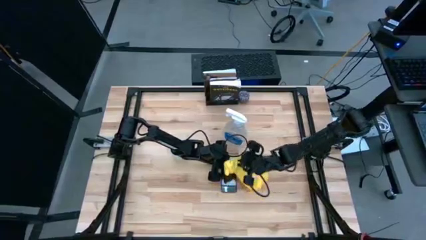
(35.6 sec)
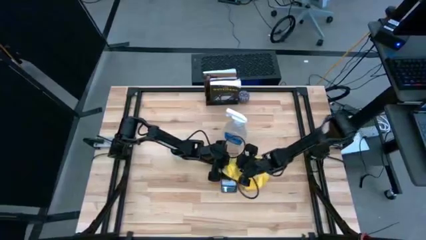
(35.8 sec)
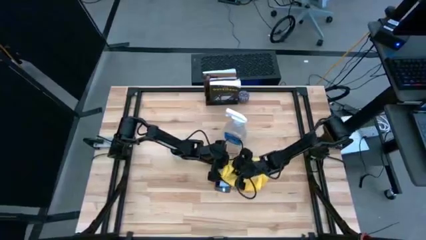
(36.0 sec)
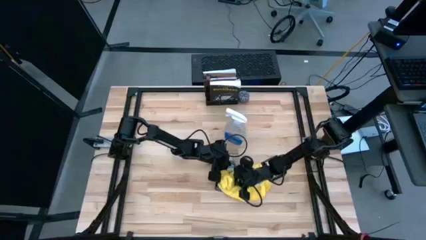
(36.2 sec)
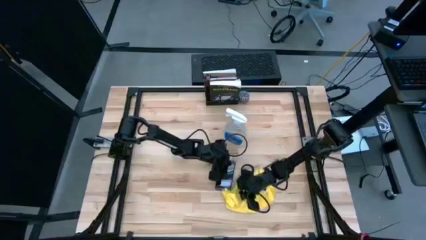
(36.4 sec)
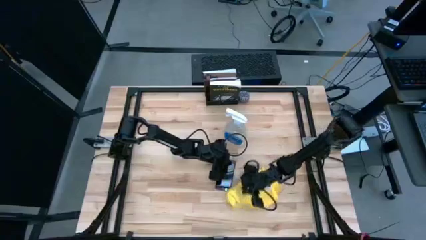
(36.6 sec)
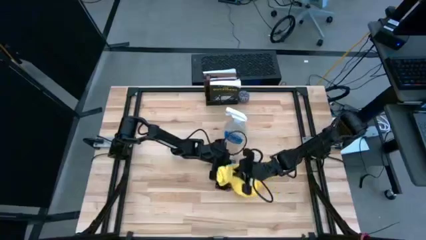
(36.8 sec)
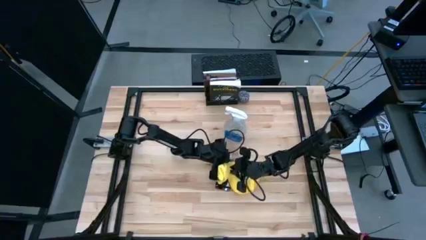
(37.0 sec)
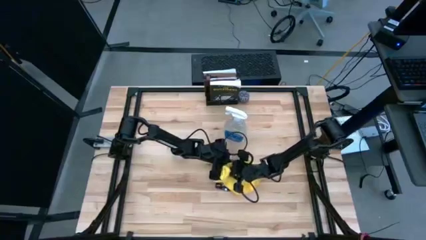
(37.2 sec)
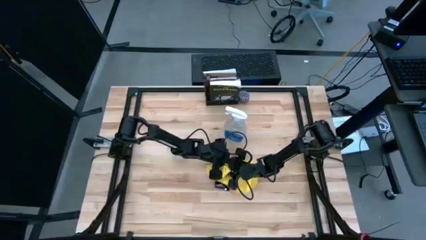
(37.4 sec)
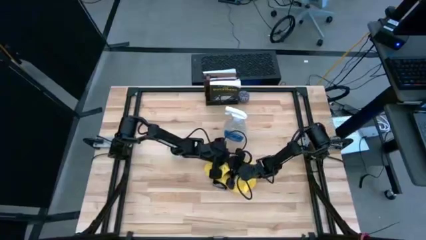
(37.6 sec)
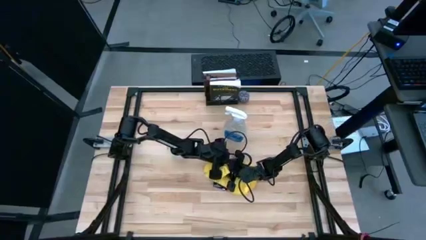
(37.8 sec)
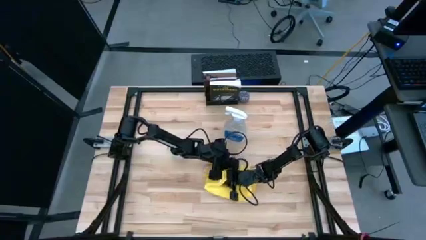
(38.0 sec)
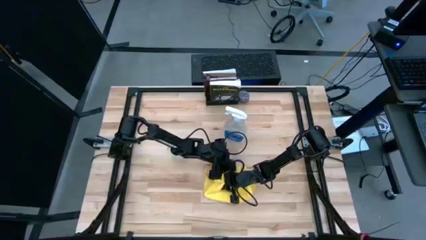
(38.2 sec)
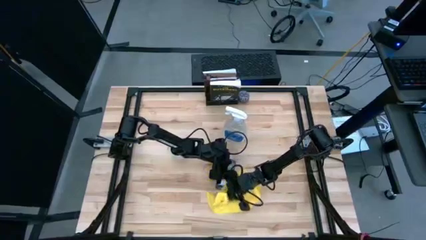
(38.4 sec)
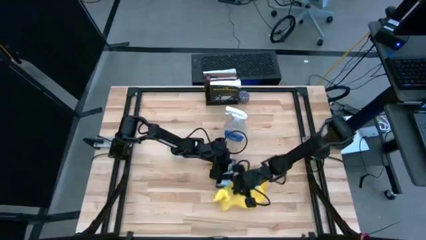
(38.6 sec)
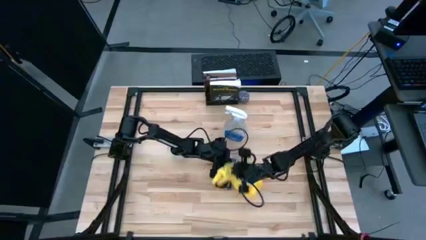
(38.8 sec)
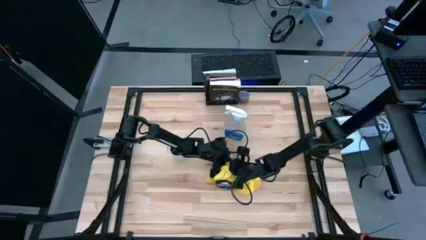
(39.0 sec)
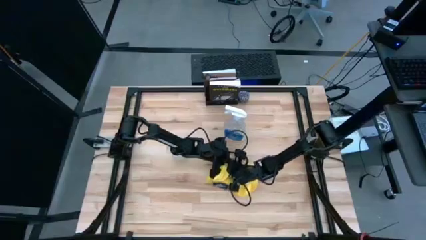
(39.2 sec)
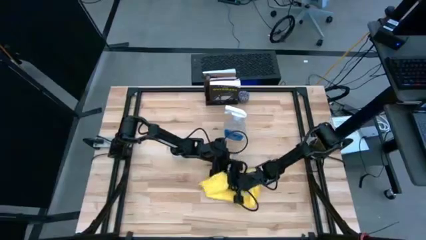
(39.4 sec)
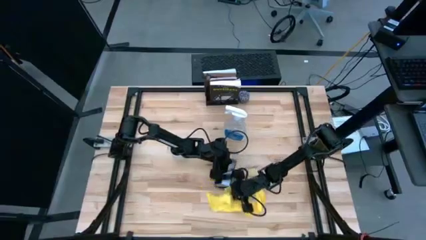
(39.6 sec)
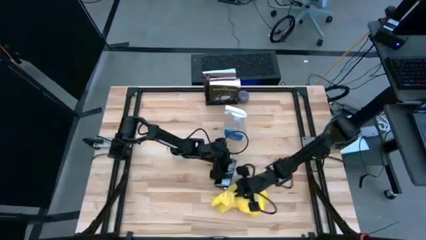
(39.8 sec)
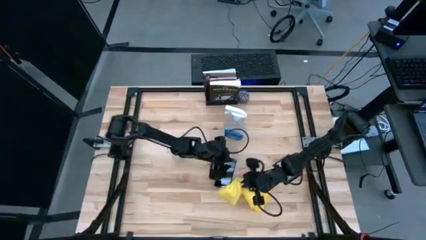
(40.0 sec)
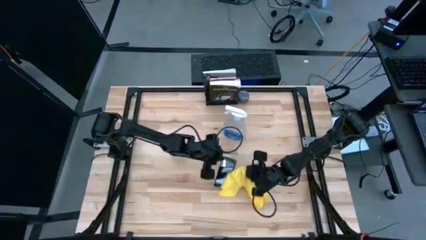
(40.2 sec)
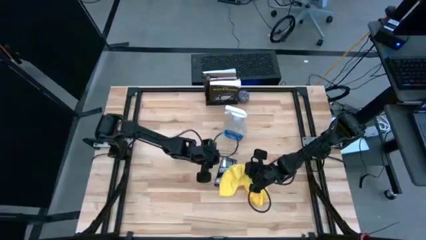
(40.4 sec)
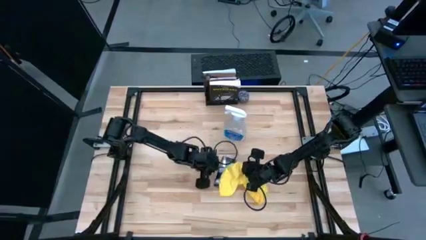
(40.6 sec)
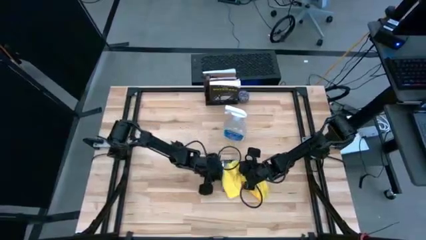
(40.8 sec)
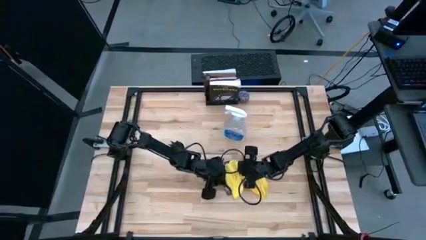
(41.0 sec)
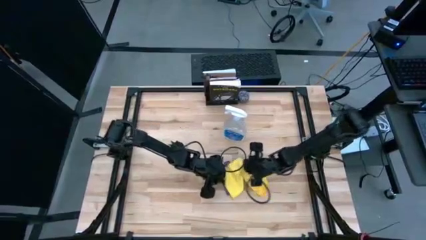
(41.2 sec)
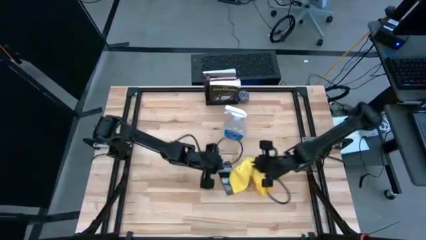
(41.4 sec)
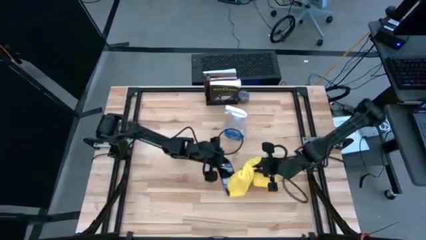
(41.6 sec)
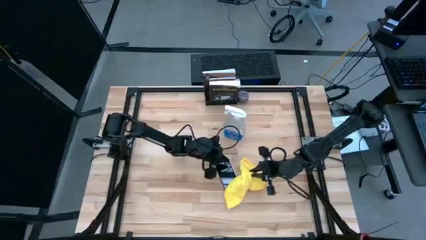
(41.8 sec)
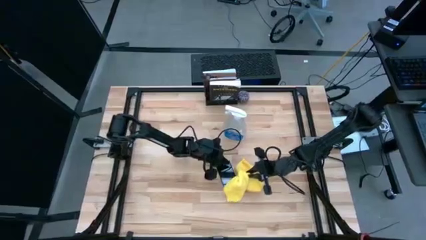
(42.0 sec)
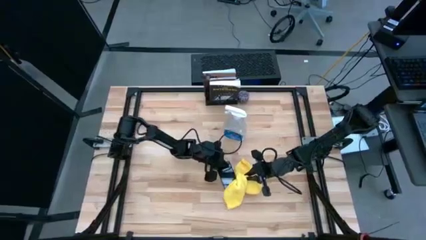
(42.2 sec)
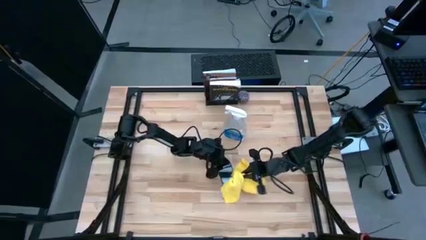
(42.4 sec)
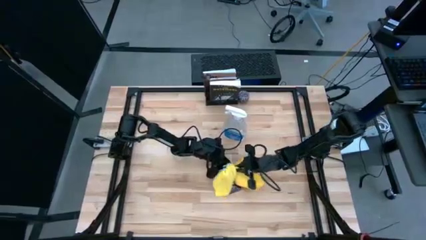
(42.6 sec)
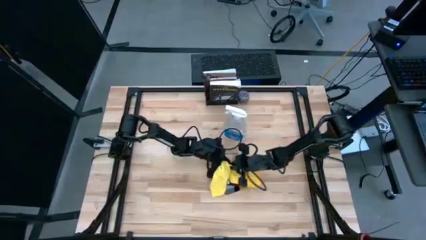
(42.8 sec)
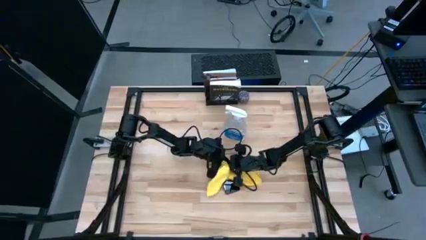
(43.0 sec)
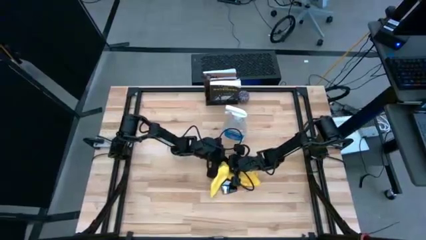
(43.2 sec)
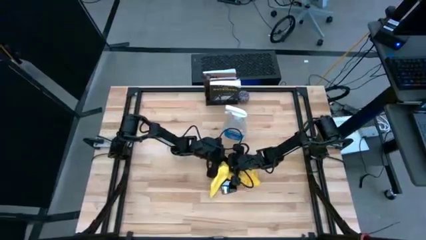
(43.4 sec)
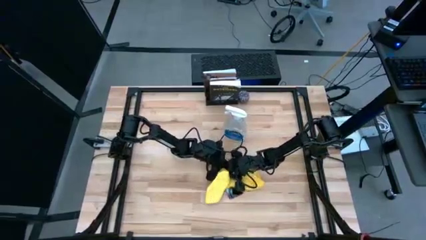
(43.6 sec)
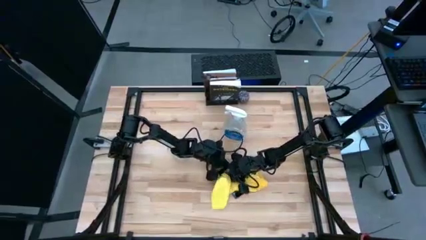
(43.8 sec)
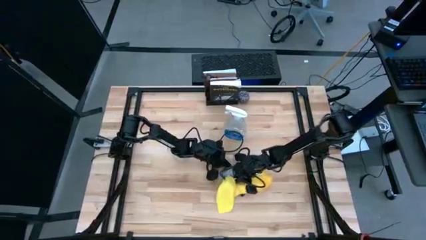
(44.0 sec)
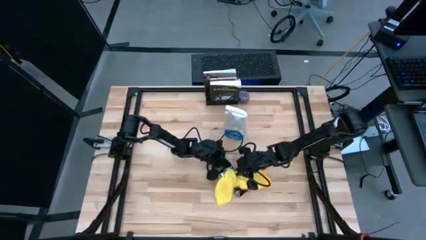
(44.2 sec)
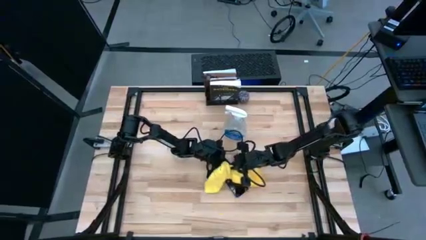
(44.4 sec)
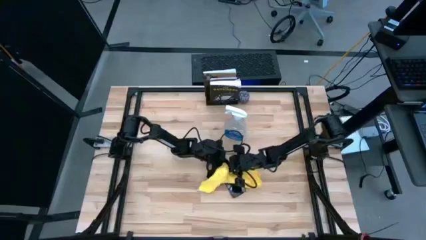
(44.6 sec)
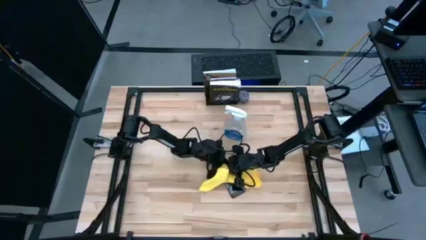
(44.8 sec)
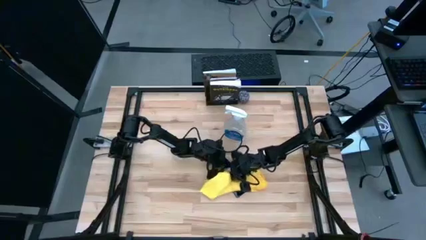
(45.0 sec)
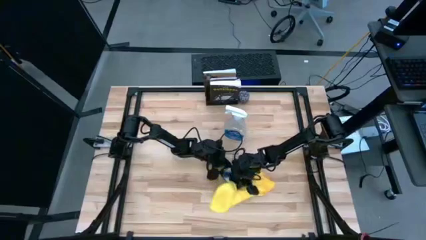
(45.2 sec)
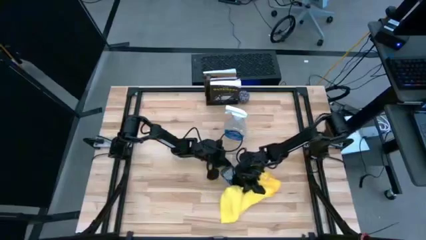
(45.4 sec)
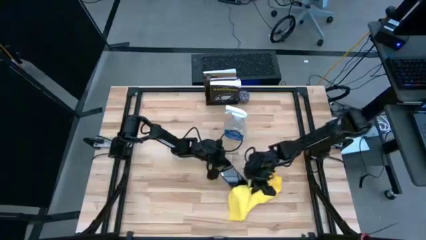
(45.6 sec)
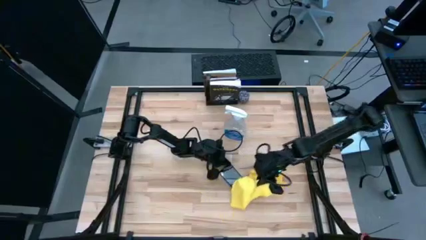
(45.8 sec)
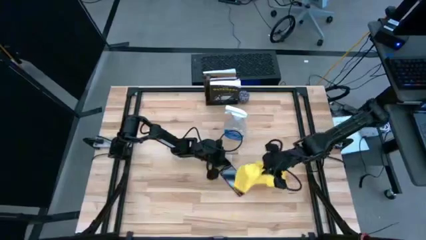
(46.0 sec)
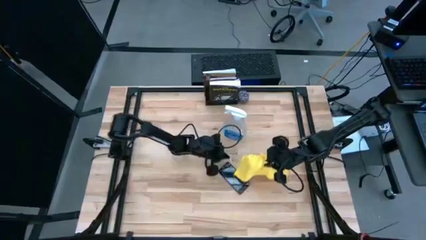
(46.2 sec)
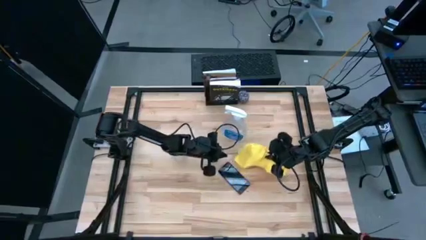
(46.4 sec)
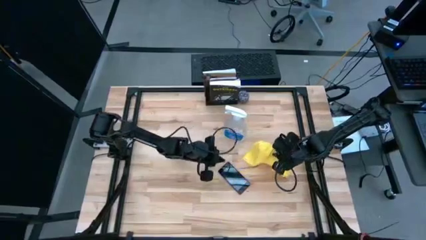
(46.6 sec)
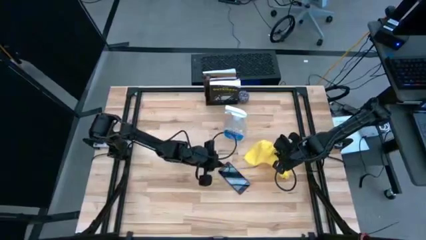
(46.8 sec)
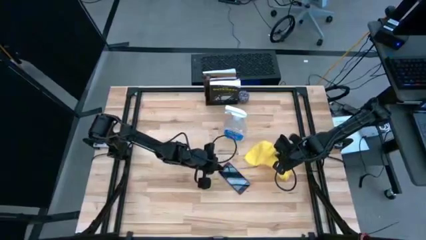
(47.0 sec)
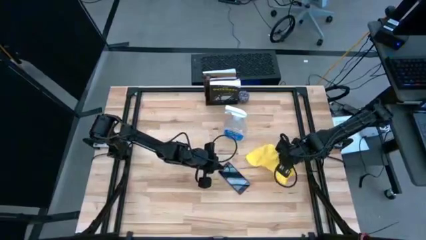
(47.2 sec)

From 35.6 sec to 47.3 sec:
Task: Apply microfiber cloth
Wipe the front of the cellphone with a microfiber cloth

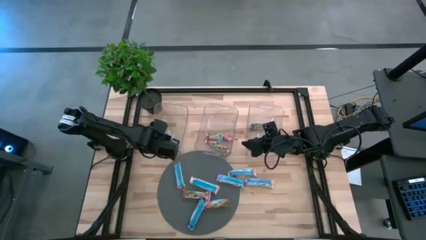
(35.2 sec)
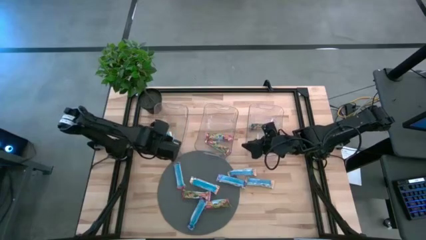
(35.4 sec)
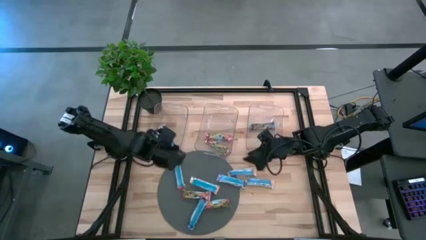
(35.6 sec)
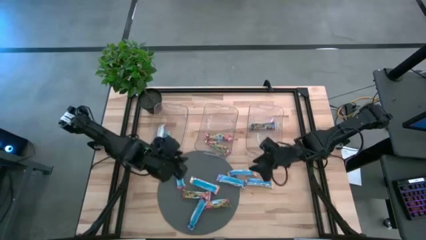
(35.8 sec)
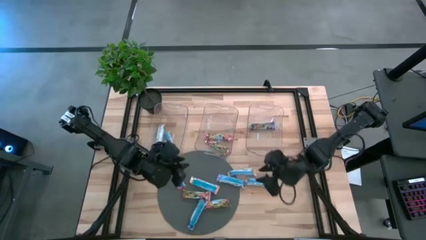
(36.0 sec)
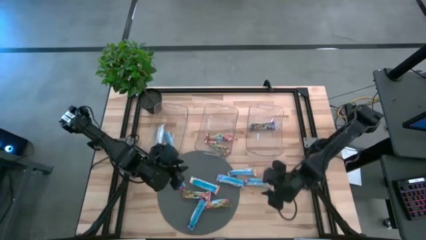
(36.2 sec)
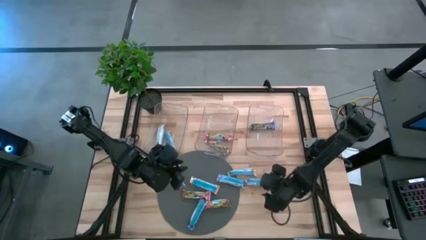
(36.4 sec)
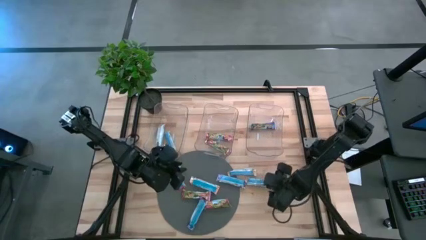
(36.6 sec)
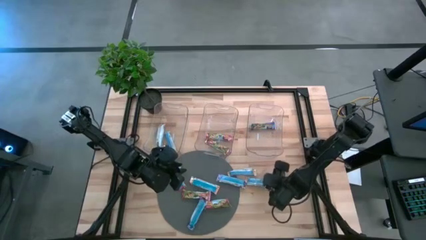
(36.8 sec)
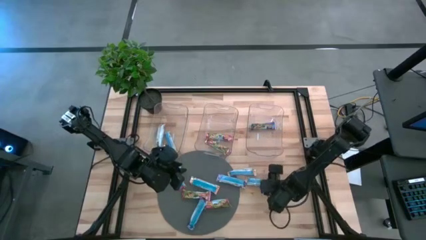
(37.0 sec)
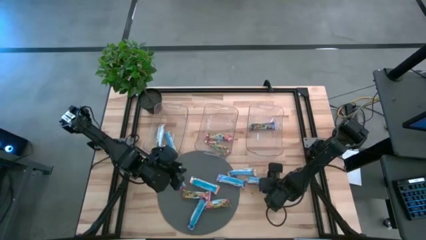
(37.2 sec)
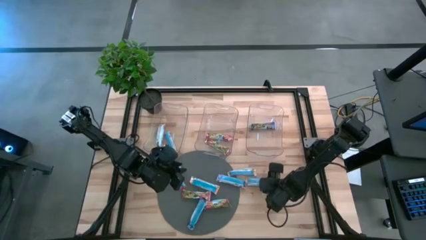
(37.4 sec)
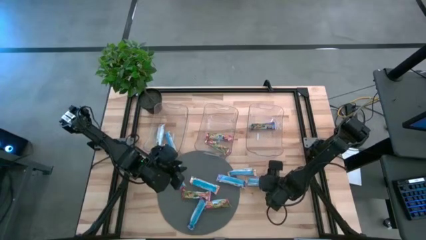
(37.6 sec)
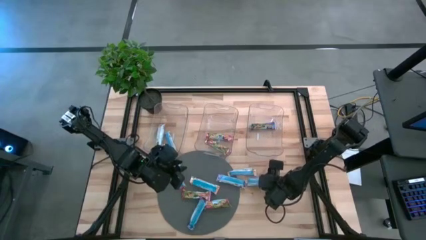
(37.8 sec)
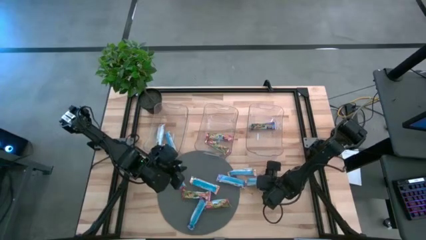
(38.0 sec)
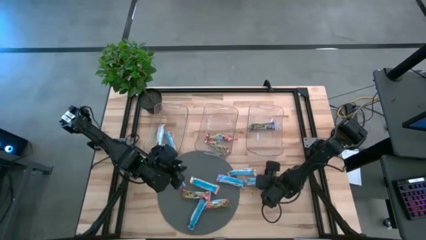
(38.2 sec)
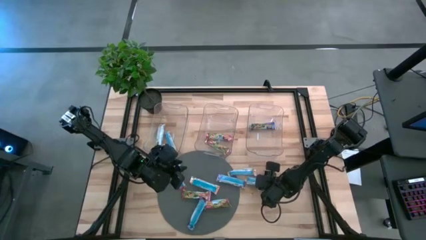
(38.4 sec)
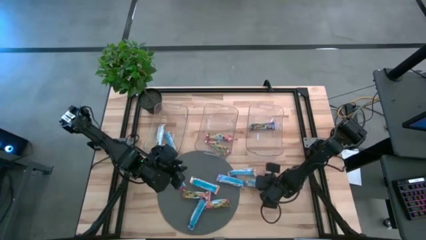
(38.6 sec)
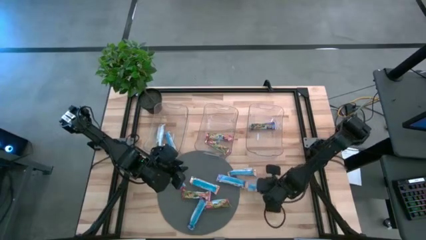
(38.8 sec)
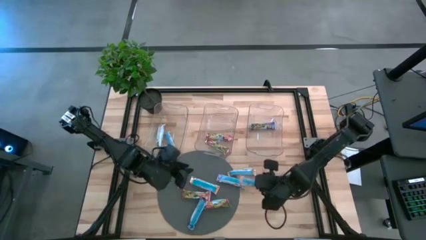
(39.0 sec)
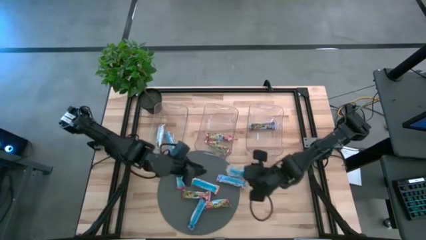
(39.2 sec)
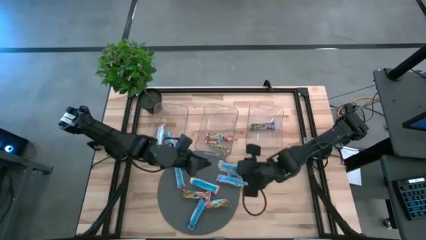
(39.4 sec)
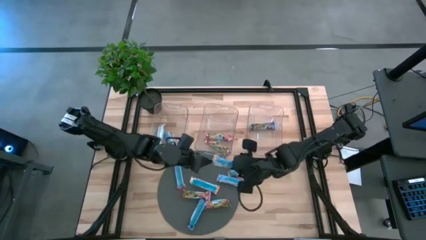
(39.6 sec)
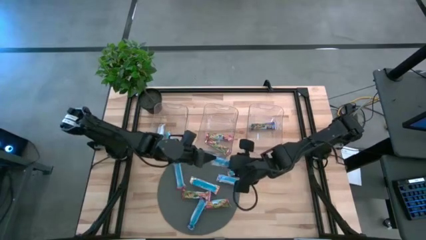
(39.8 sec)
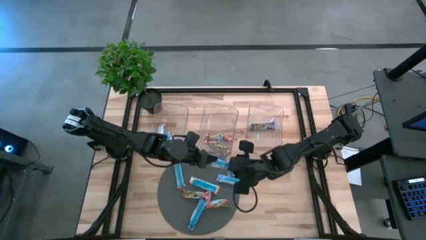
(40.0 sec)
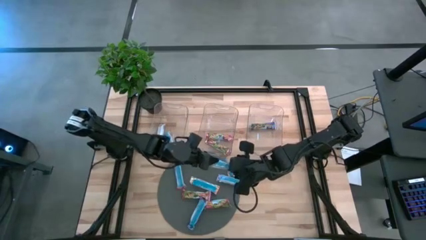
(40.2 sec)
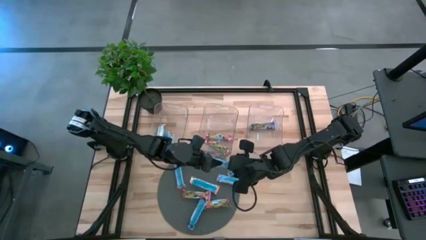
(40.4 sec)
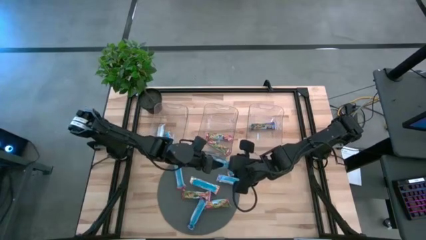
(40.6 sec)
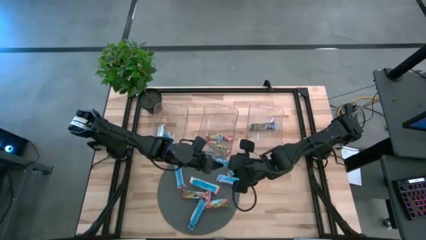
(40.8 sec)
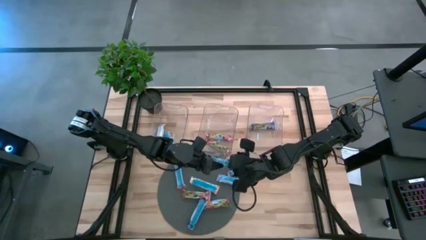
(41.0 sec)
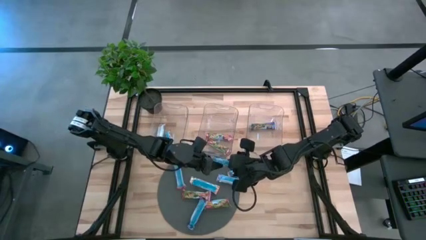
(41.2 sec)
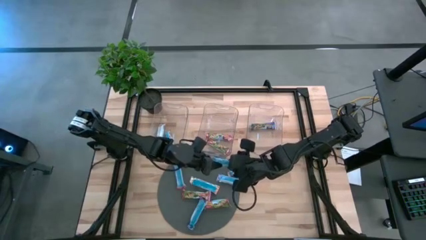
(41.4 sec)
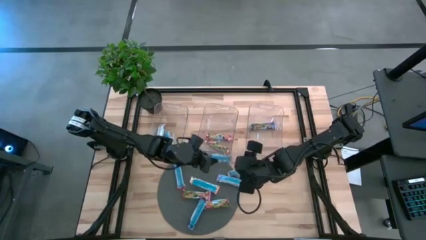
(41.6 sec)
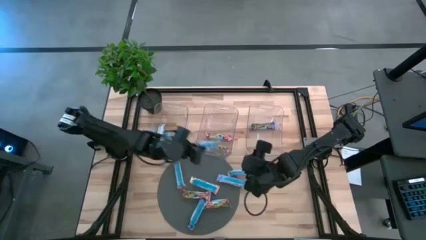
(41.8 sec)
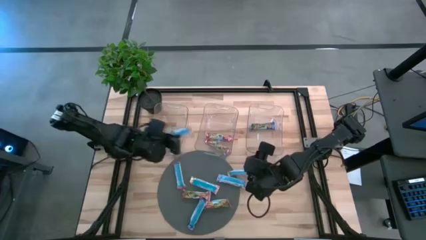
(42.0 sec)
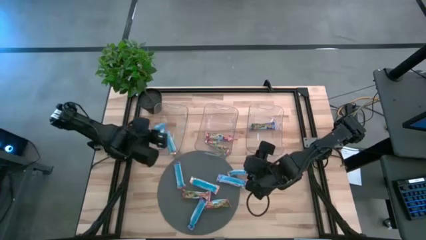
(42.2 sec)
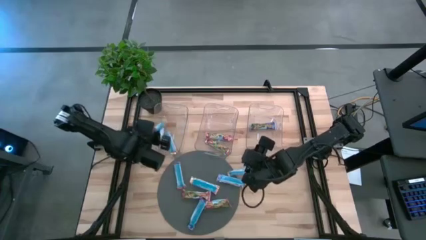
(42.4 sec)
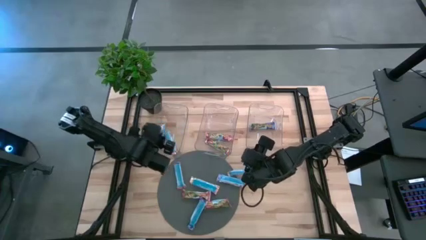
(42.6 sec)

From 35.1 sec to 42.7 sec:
Task: Pick and place Granola Bars by type
Put the yellow granola bar into the left transparent bin
